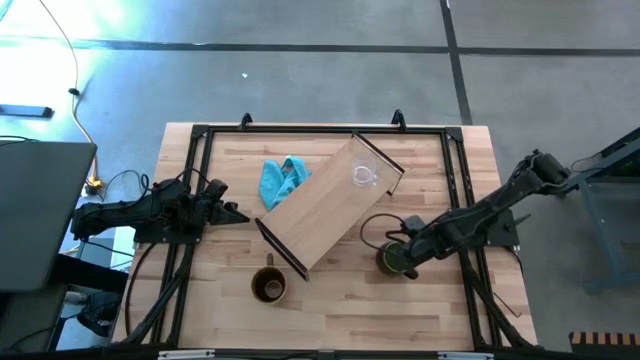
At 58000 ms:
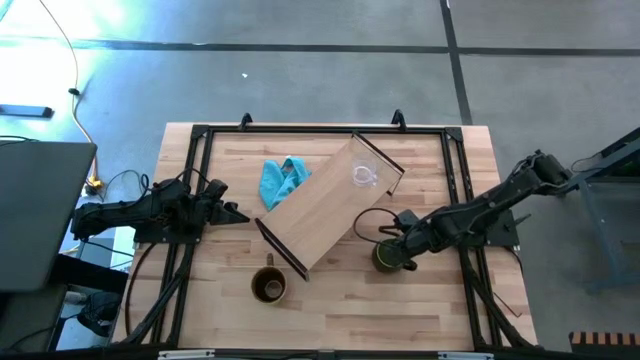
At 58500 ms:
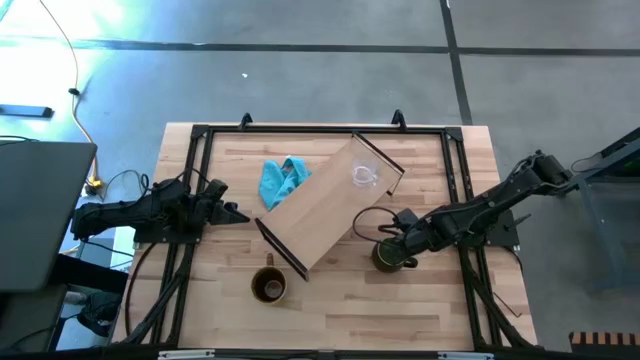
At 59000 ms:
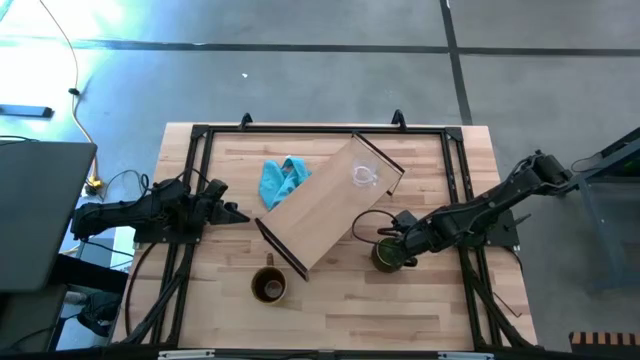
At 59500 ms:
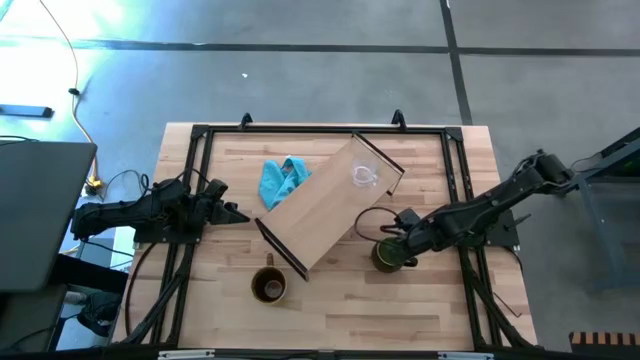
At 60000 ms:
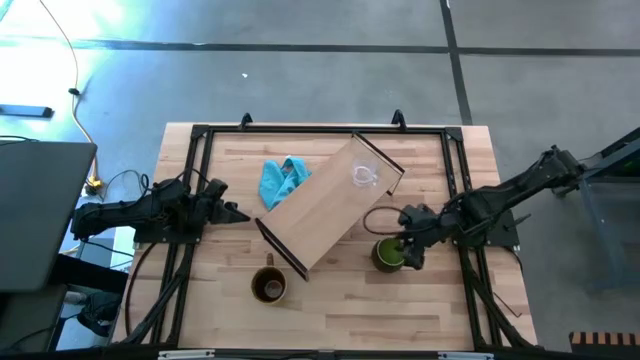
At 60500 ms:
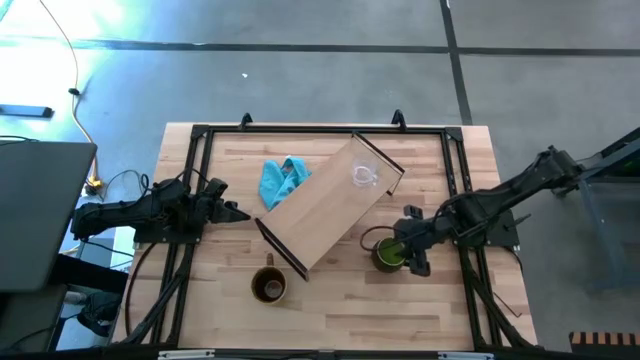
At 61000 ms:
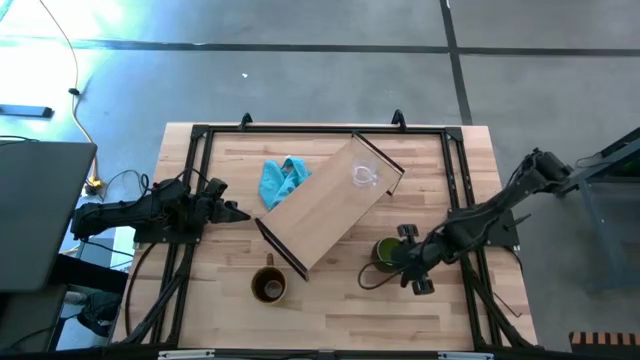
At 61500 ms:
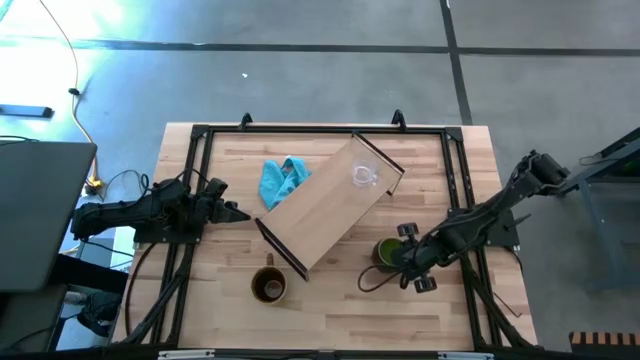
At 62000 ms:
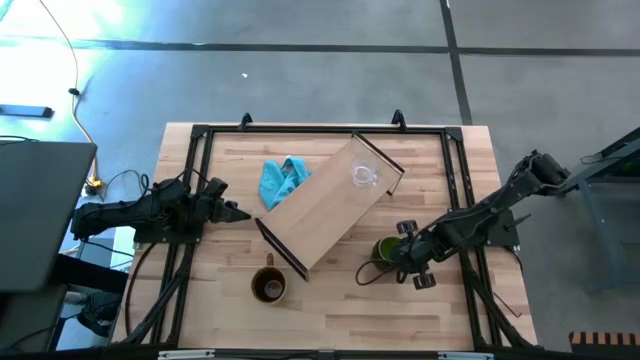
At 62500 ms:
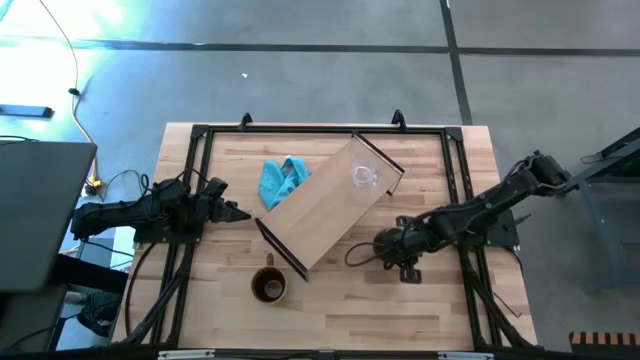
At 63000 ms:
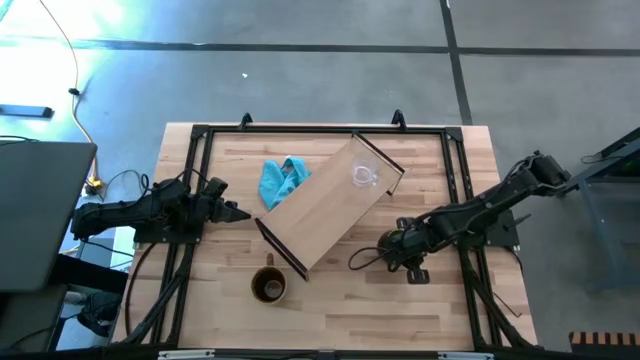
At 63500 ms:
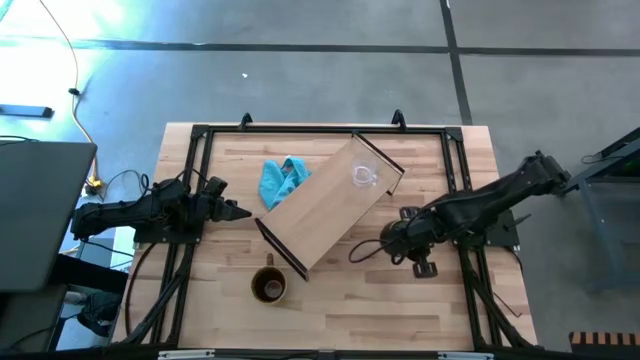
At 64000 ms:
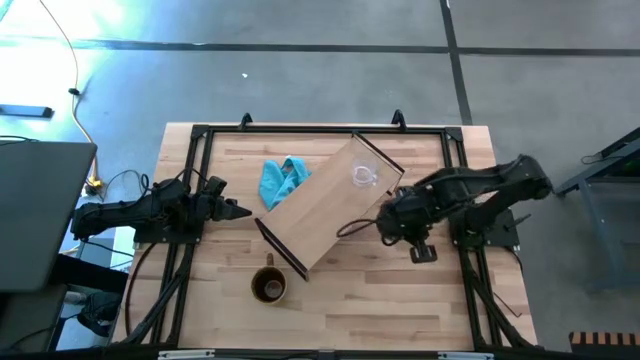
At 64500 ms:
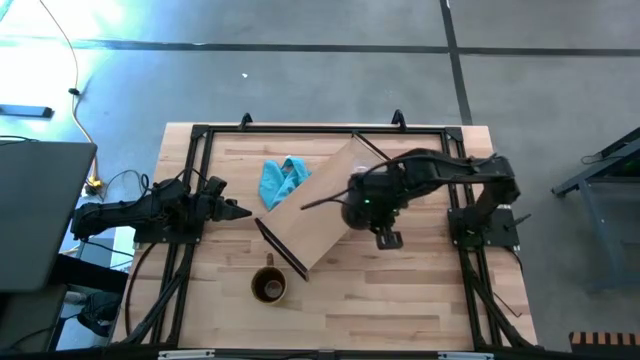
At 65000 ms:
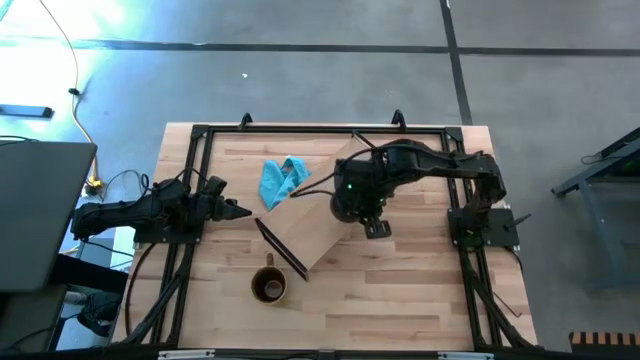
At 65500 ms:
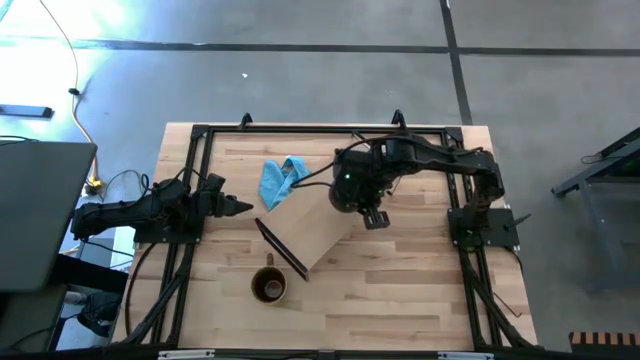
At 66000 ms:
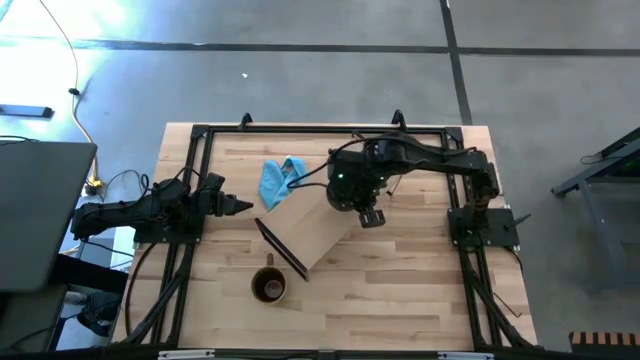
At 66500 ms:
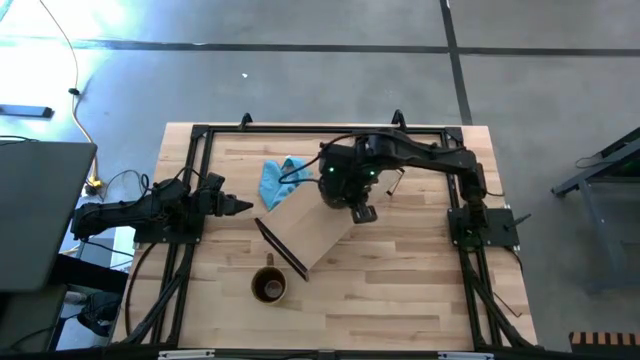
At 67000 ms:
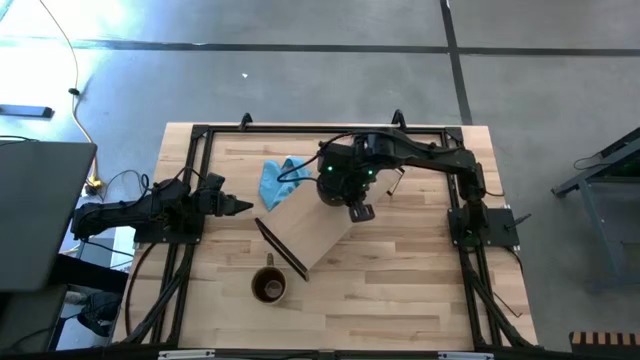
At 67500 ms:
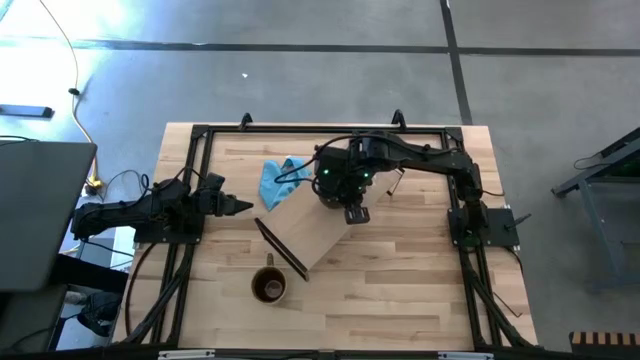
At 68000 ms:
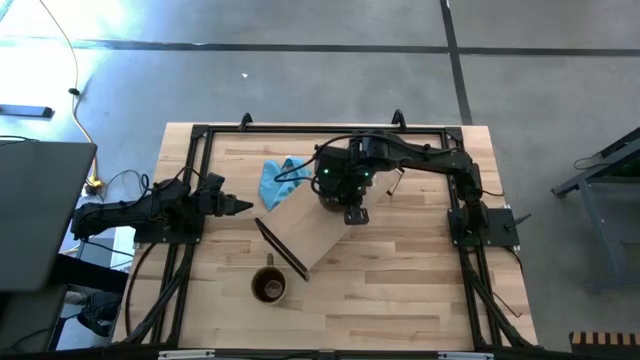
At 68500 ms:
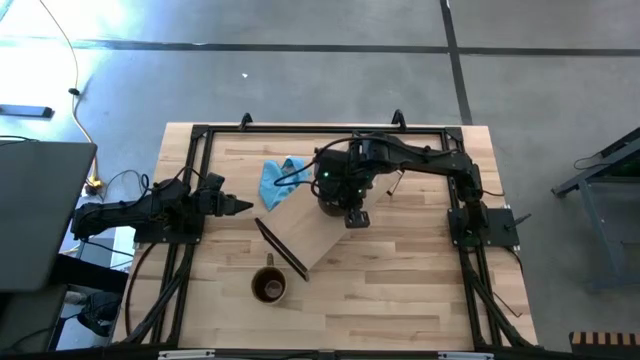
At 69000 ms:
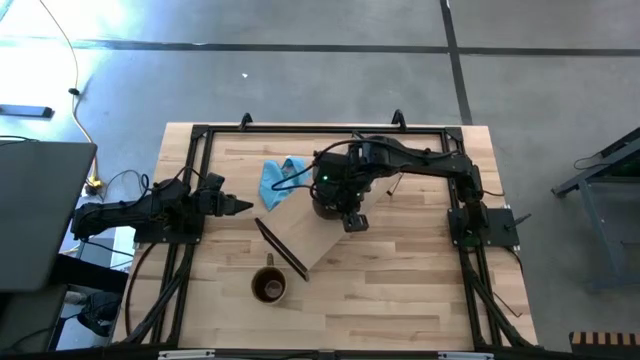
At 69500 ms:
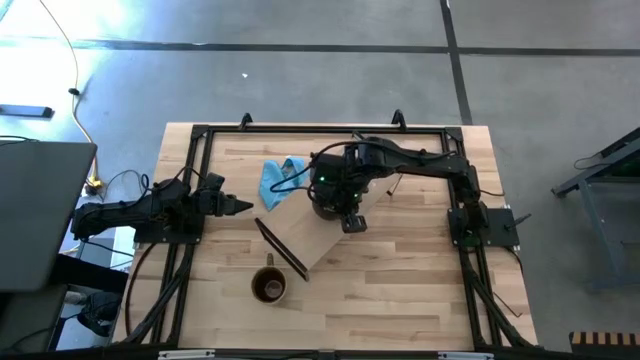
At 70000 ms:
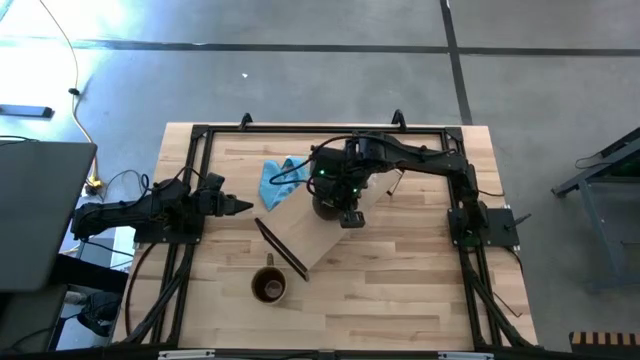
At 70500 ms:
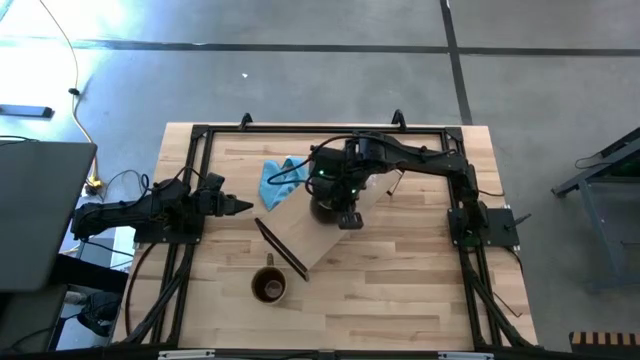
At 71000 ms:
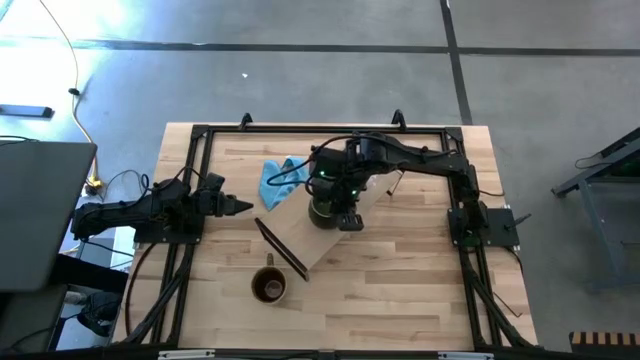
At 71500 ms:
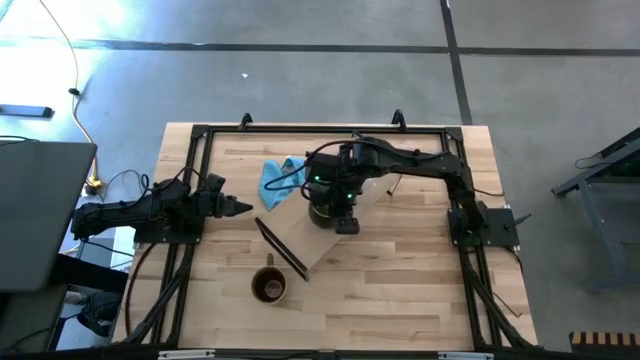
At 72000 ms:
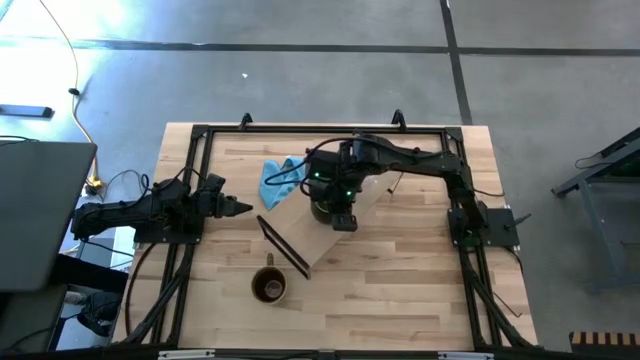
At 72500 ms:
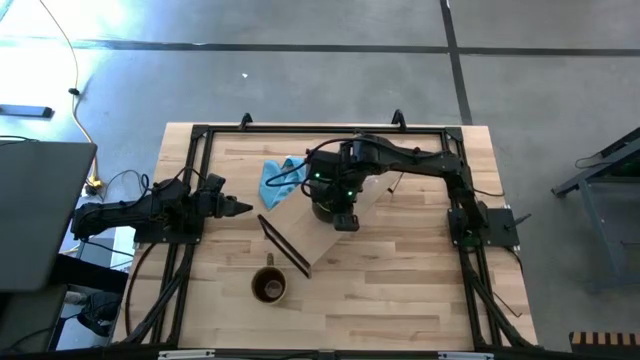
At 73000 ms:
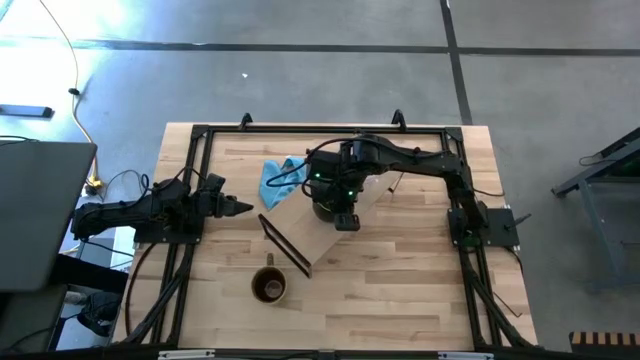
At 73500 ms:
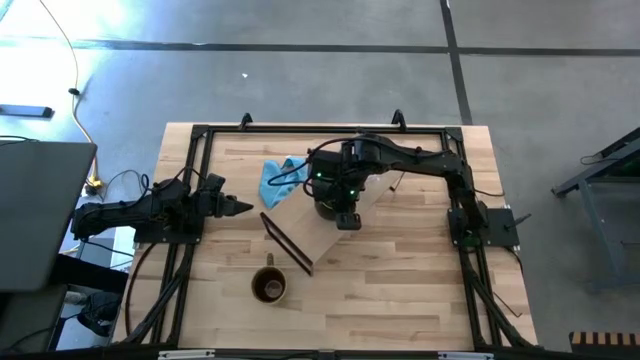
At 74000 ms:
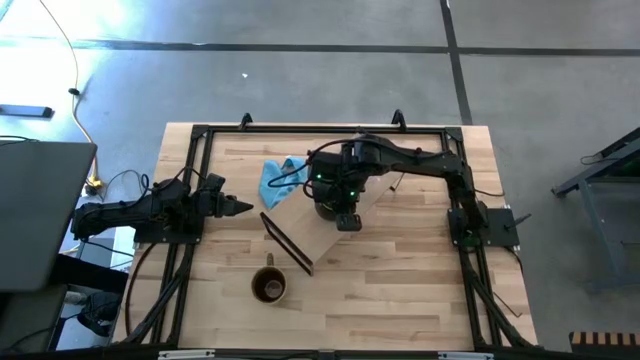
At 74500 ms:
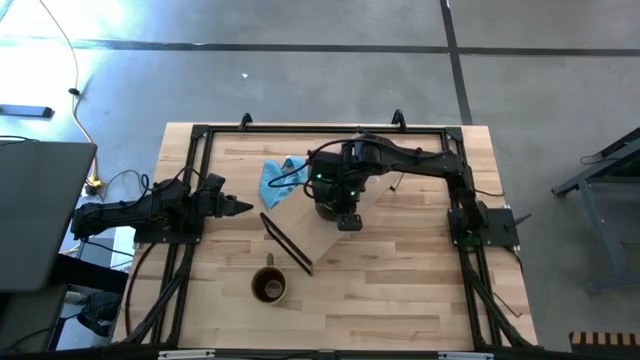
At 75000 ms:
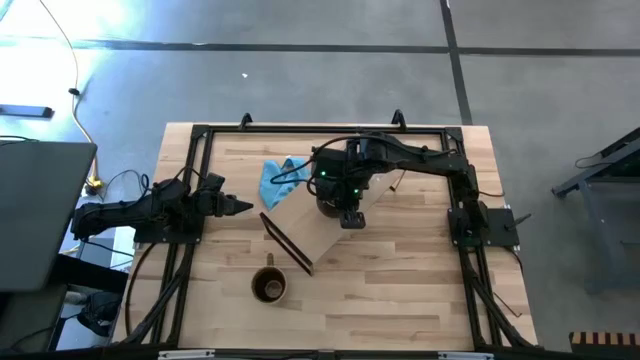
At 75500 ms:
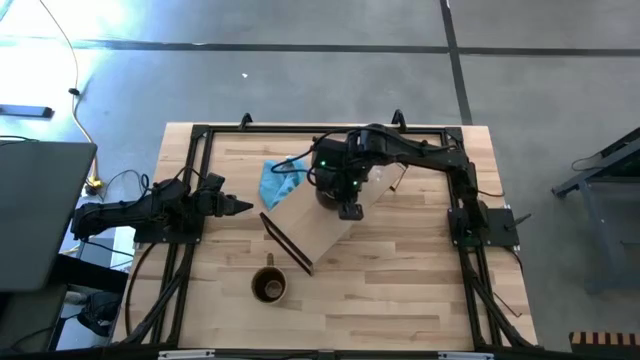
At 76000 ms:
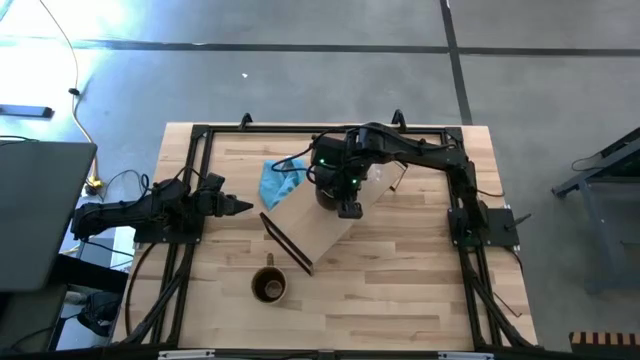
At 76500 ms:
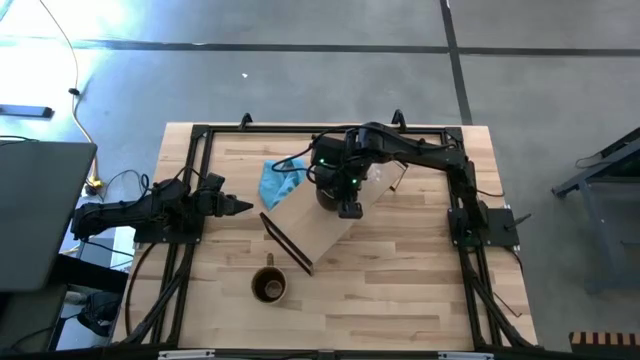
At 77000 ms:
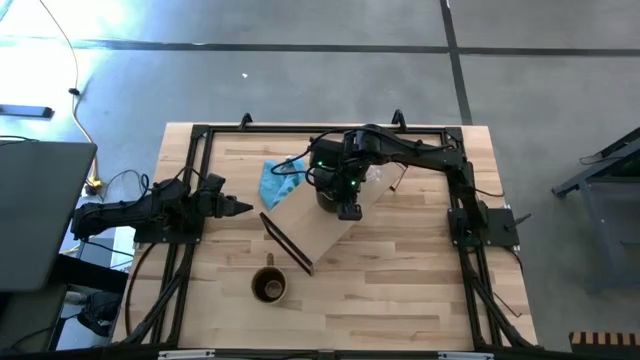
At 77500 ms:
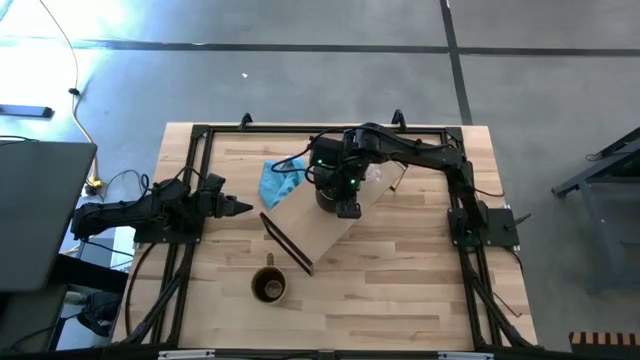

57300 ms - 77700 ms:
Task: Stack small to large cups/mugs on shelf
Put the black mug on the shelf
